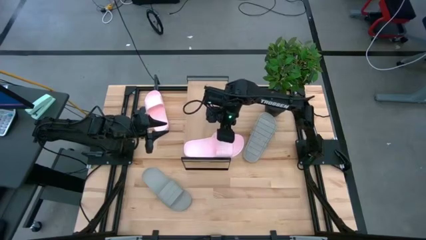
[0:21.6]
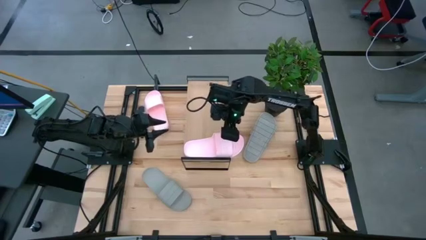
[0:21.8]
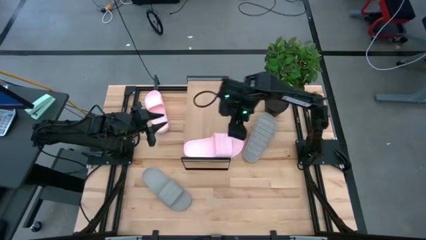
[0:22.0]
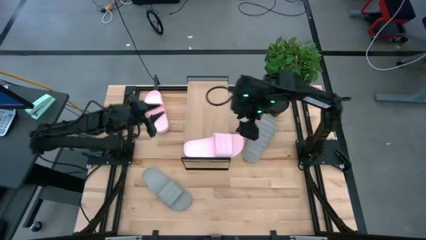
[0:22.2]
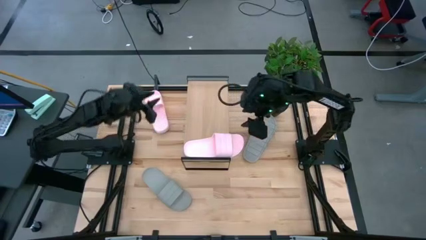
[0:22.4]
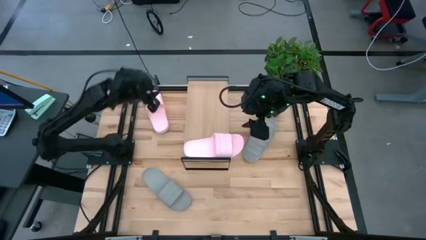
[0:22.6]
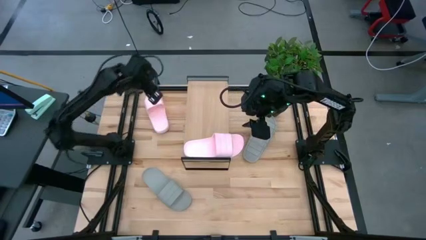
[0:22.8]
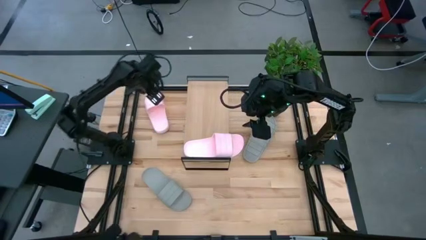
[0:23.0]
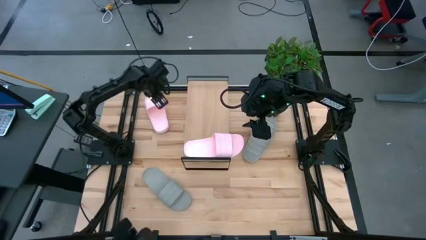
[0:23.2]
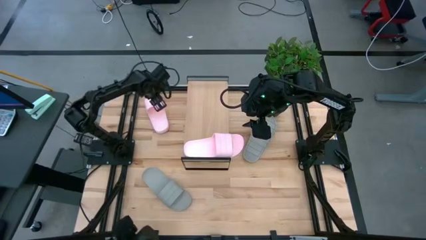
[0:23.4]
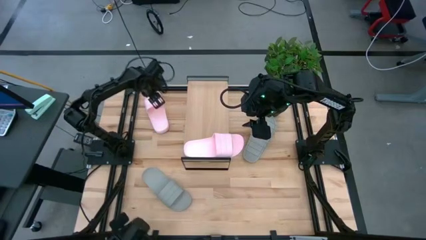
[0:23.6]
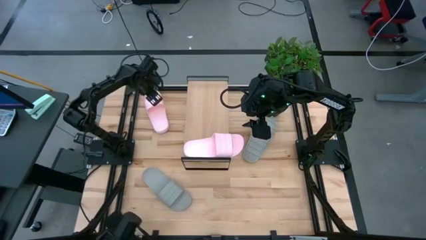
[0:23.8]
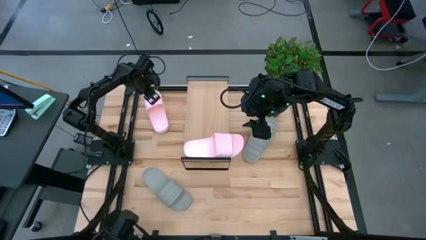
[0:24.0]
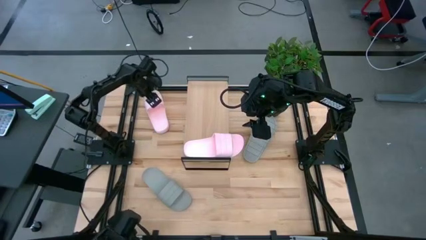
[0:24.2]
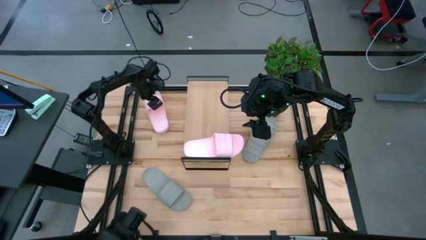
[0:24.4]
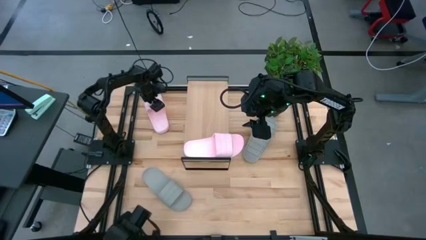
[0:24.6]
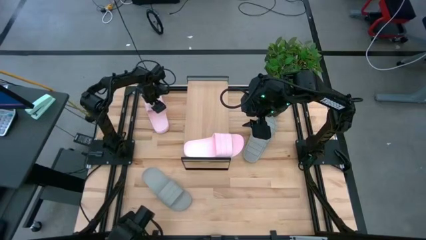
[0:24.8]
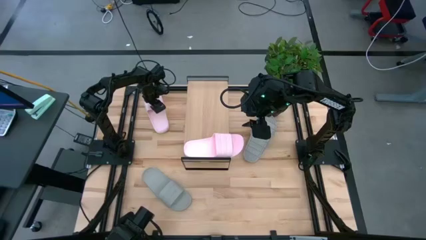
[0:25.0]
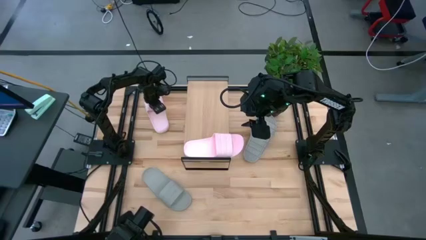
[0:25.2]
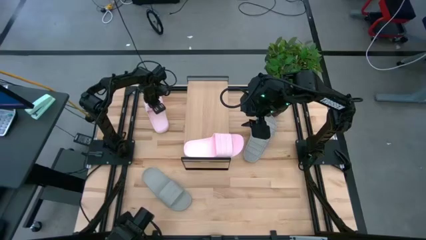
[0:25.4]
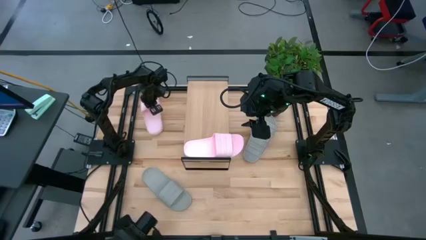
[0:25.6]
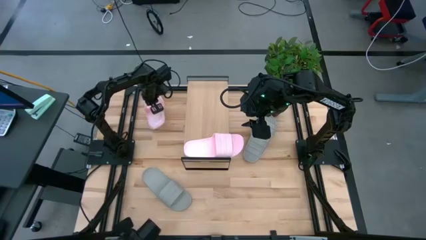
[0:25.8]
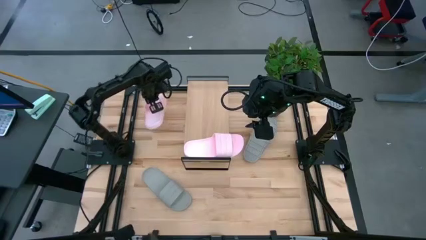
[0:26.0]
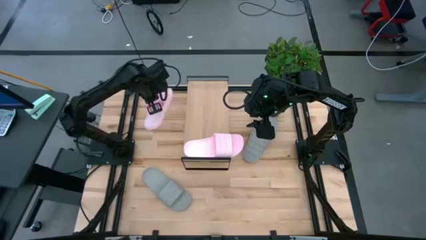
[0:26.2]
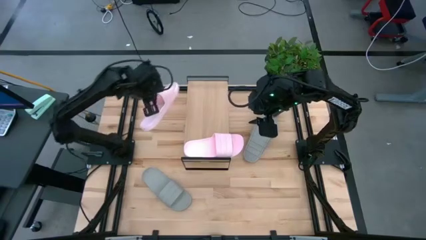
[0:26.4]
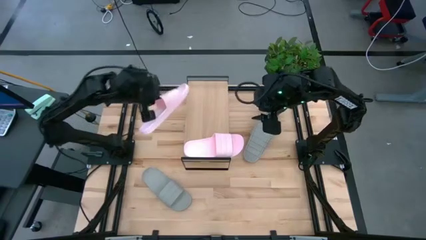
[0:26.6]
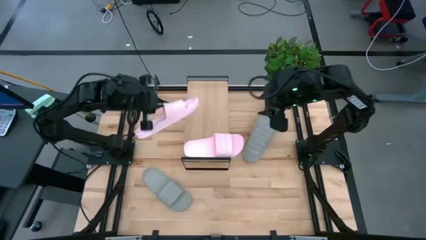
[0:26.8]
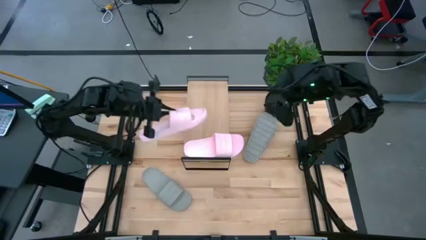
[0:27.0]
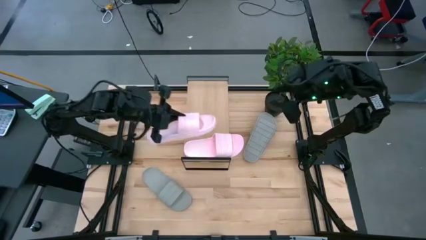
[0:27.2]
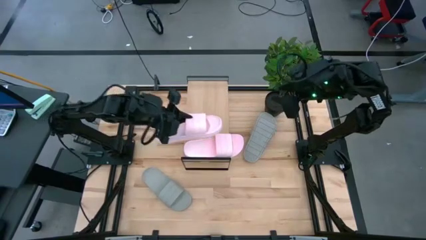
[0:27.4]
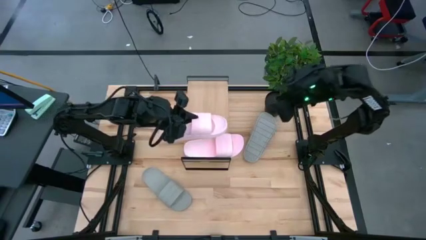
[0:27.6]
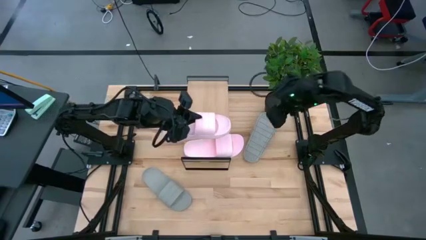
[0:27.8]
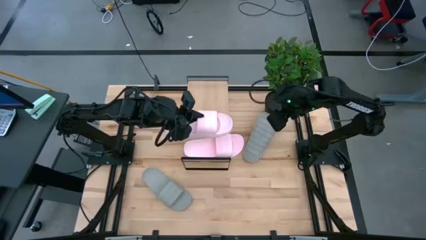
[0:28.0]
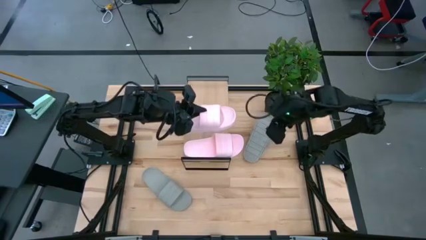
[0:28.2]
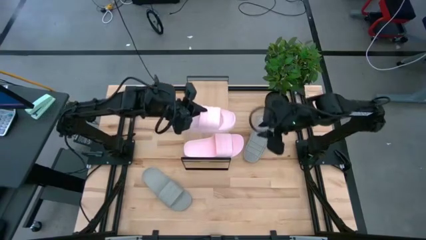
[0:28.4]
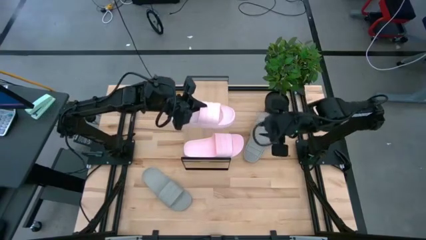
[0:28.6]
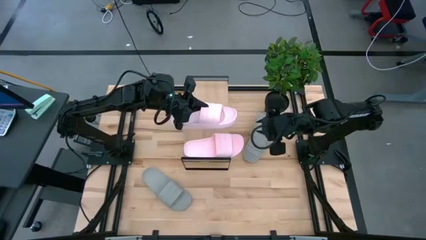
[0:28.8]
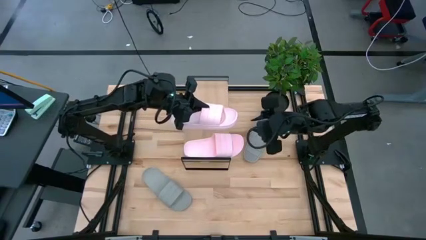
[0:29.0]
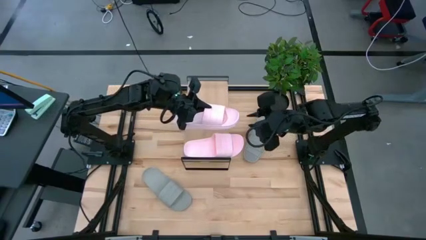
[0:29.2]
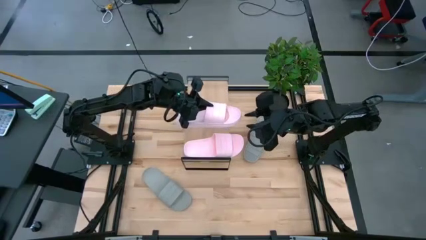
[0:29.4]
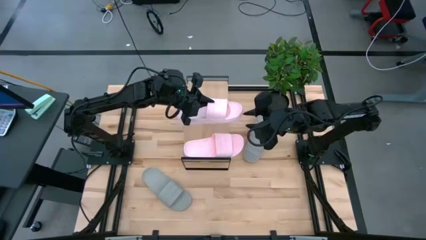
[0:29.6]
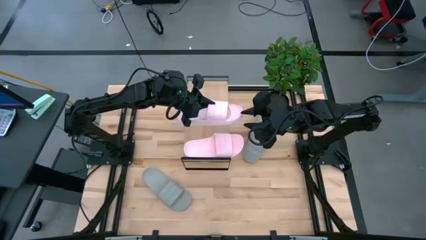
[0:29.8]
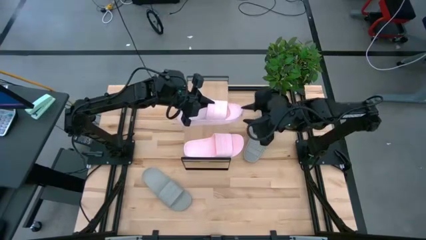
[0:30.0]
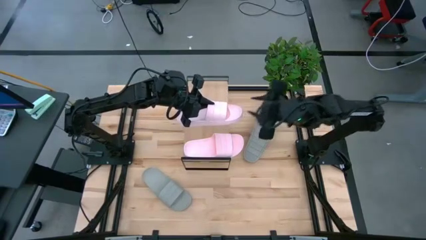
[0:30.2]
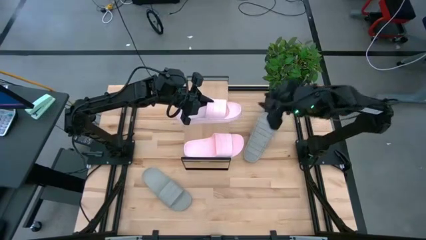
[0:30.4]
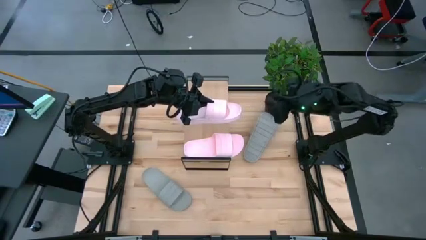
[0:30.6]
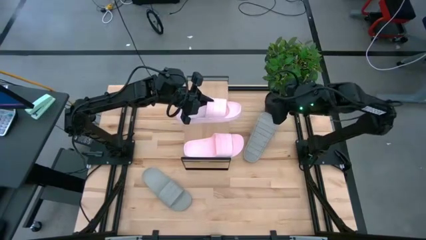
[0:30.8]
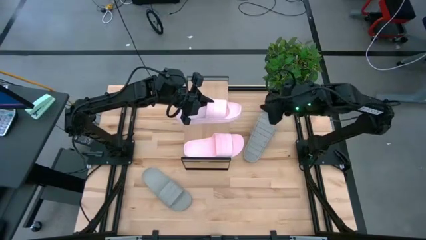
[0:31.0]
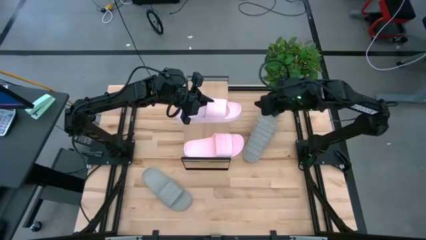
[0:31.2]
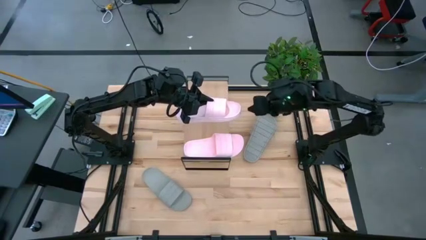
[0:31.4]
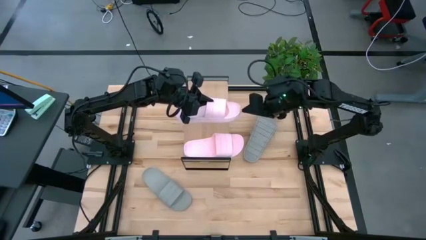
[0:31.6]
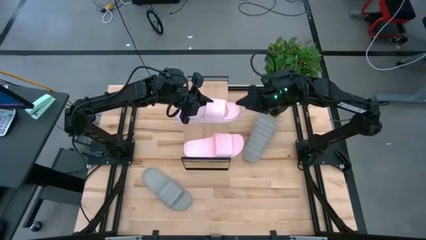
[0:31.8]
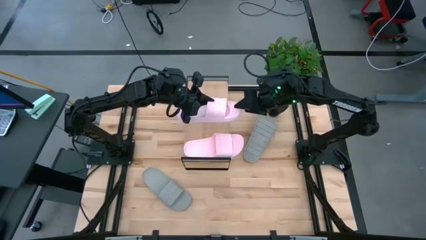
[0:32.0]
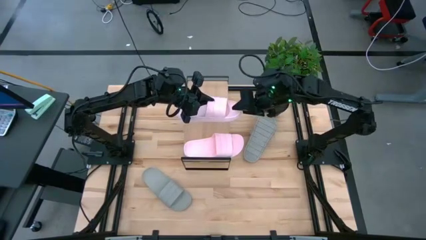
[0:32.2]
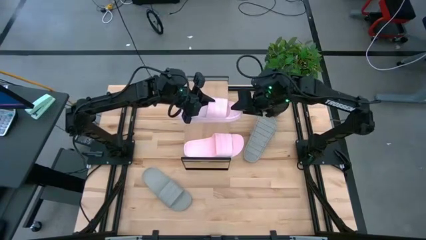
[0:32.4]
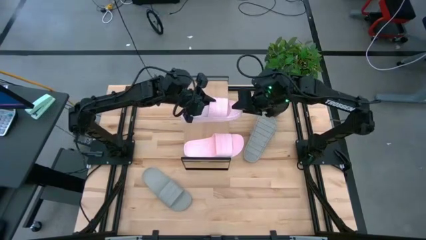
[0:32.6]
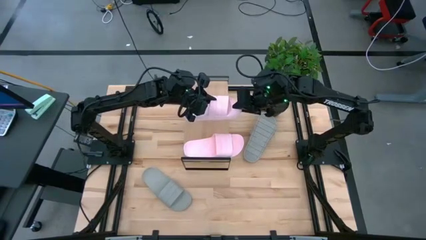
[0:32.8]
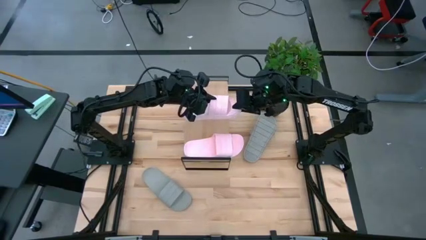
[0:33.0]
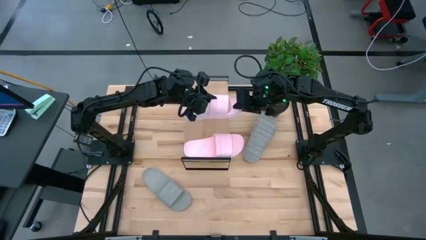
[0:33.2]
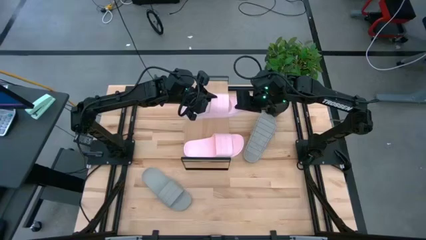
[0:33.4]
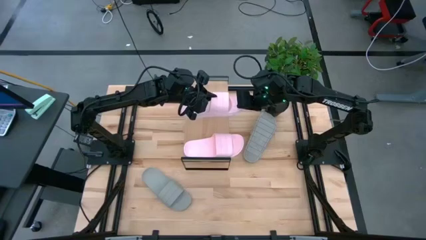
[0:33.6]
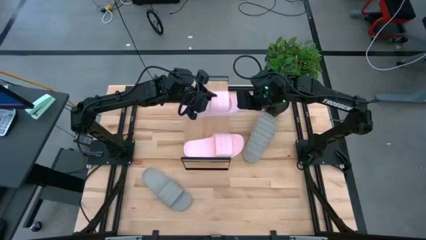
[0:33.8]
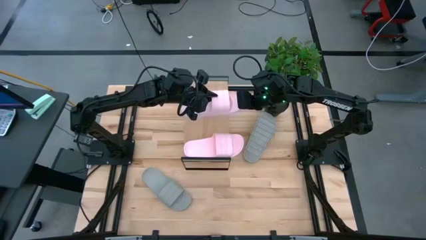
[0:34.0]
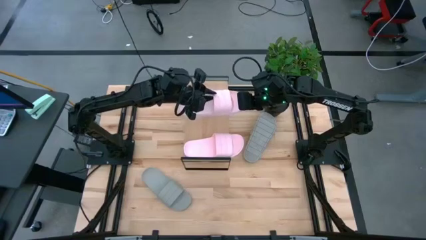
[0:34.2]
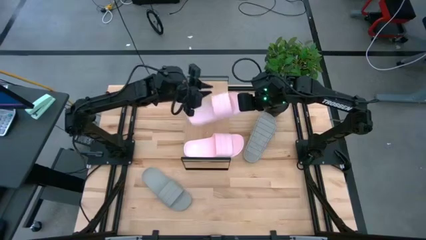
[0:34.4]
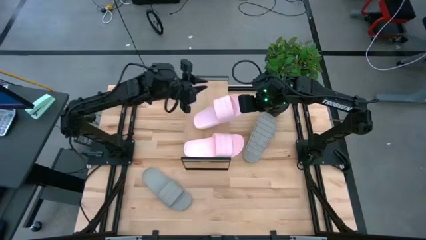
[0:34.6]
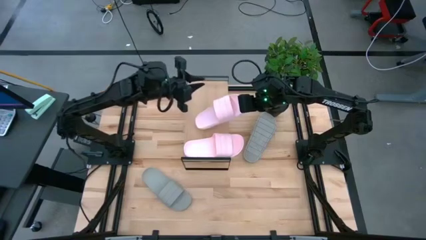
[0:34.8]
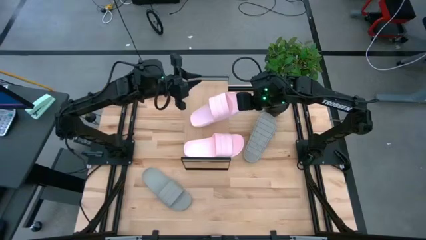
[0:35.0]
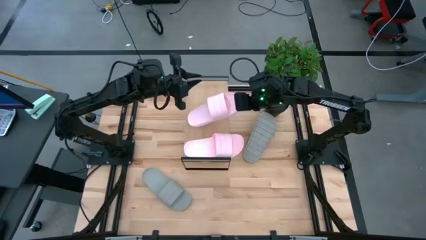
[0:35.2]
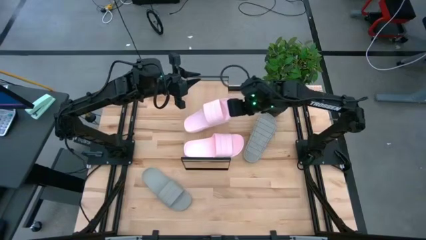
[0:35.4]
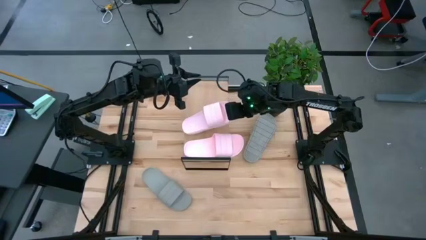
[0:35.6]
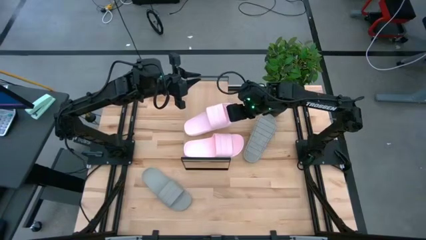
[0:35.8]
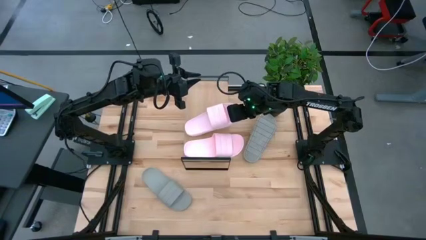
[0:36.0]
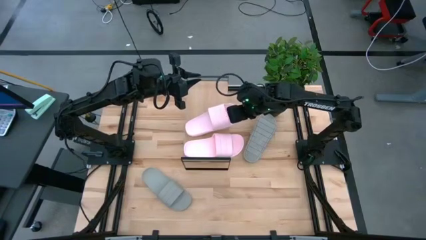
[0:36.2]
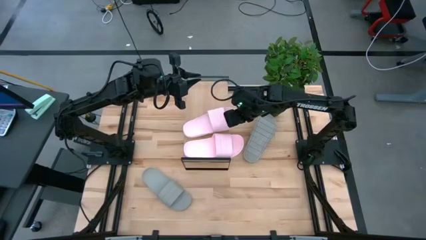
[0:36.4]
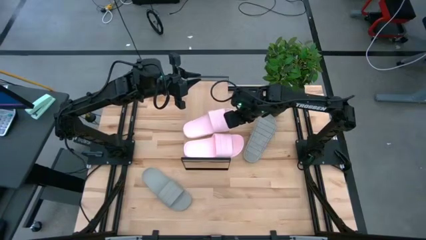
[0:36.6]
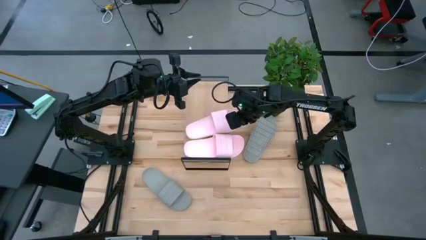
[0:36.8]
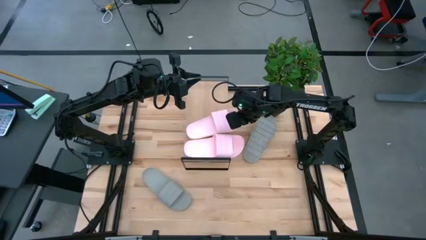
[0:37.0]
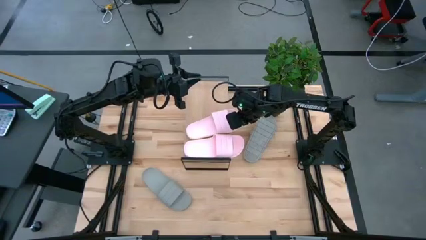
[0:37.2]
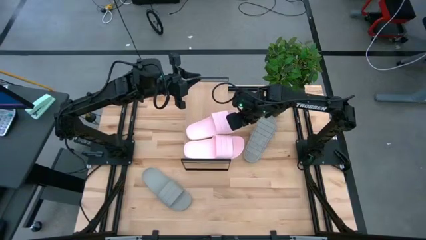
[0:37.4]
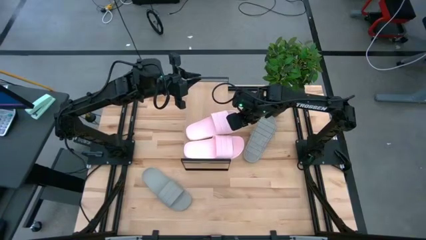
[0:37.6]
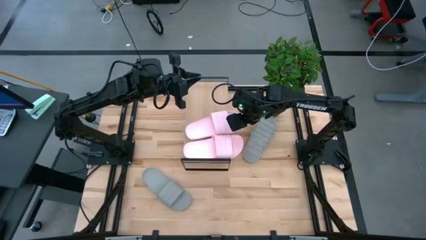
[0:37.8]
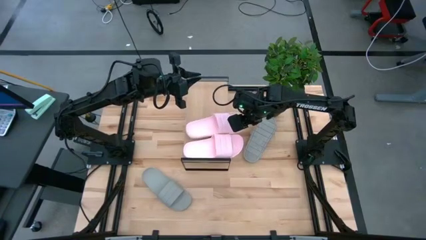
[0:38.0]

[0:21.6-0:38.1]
Task: Pick and place slides into the shelf
Put the pink slides on top of the shelf
